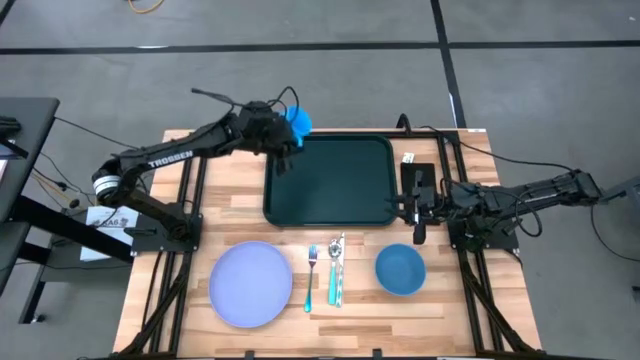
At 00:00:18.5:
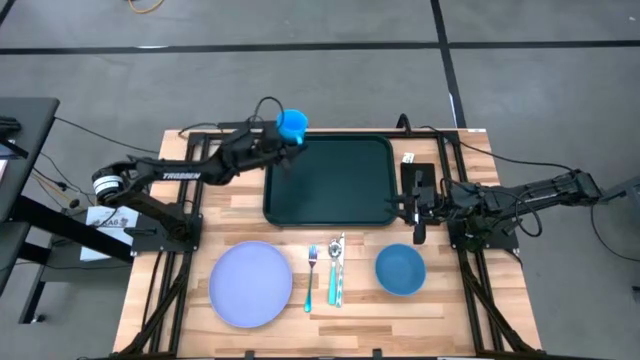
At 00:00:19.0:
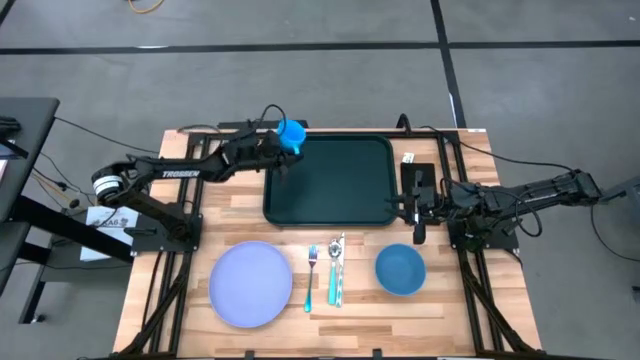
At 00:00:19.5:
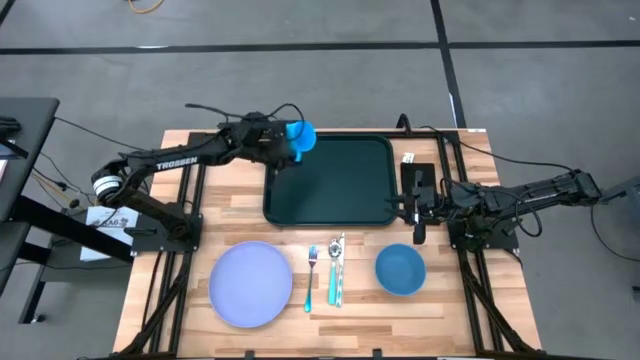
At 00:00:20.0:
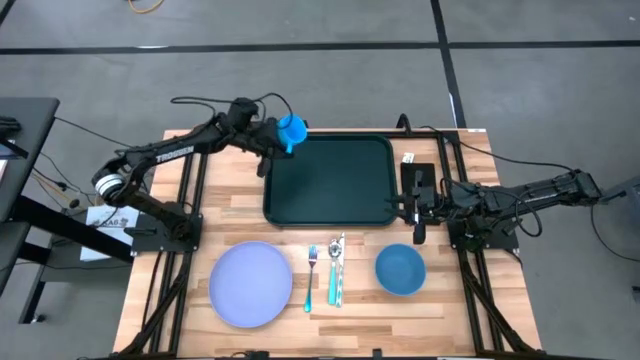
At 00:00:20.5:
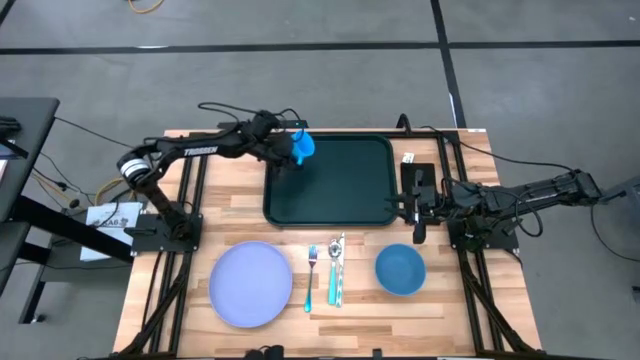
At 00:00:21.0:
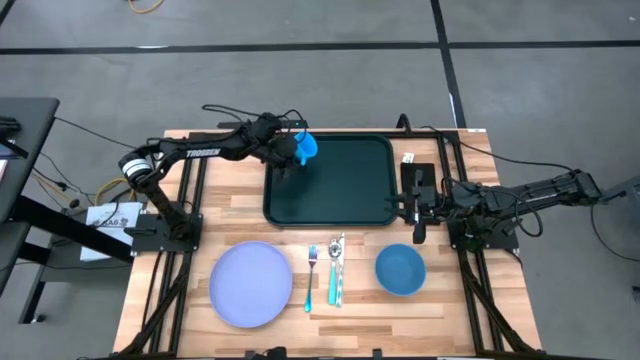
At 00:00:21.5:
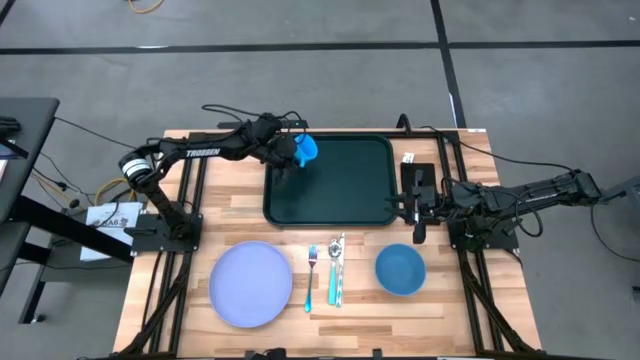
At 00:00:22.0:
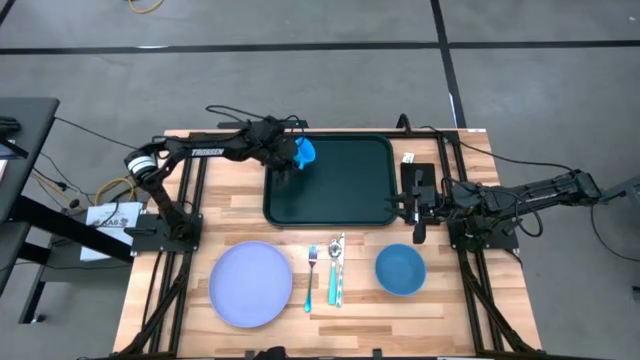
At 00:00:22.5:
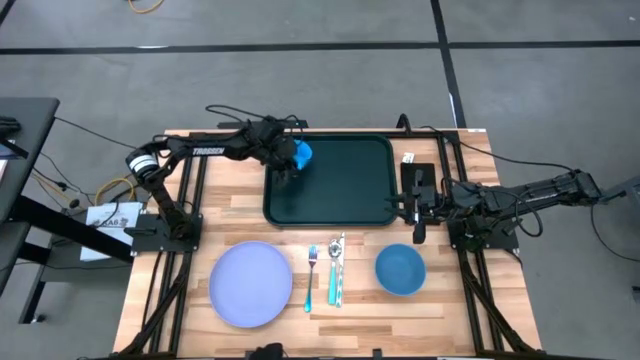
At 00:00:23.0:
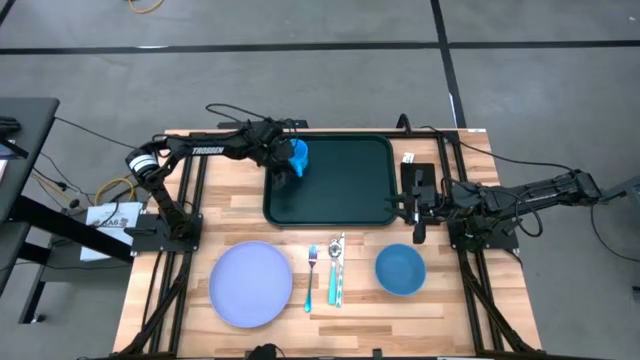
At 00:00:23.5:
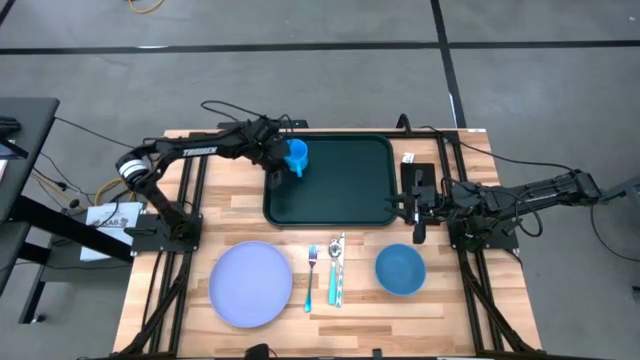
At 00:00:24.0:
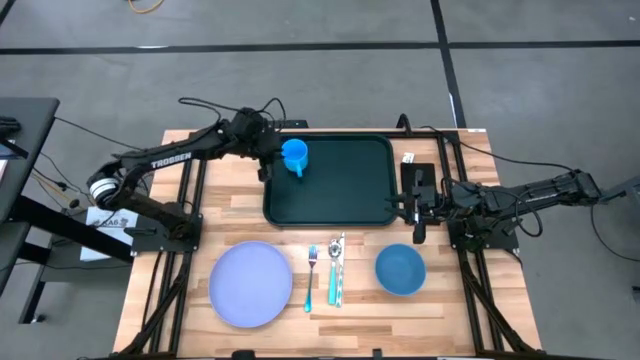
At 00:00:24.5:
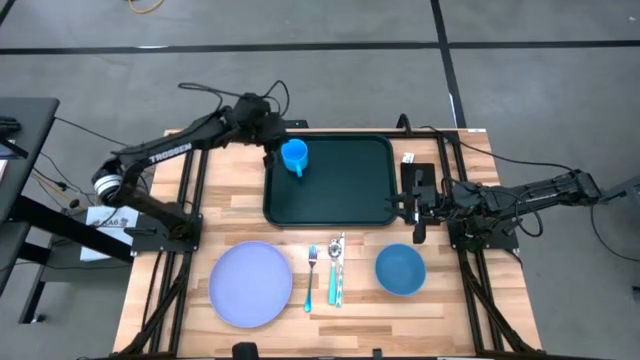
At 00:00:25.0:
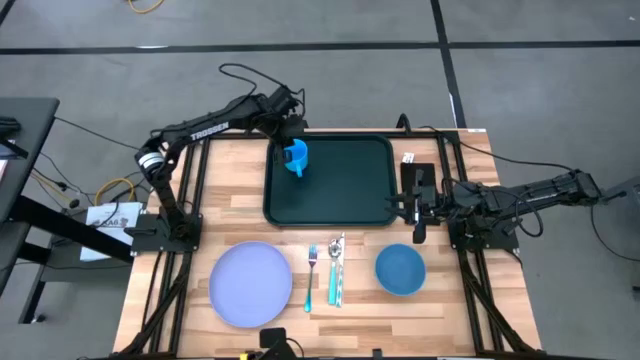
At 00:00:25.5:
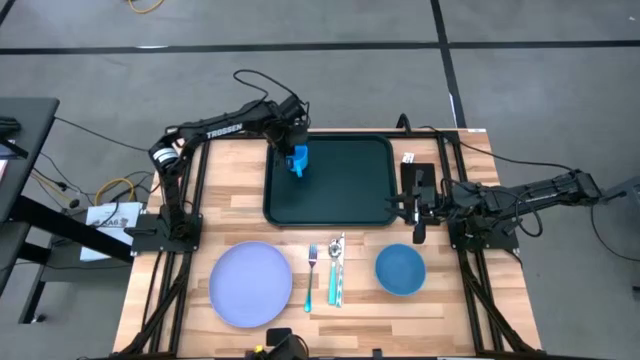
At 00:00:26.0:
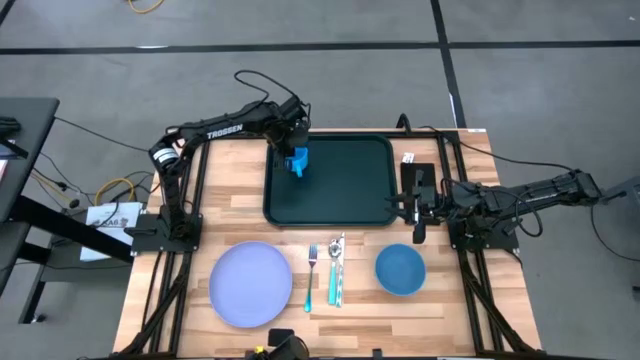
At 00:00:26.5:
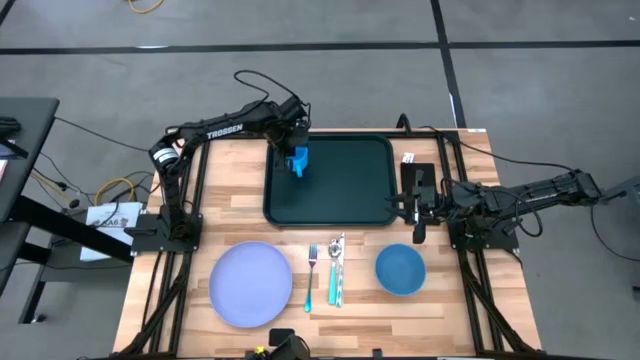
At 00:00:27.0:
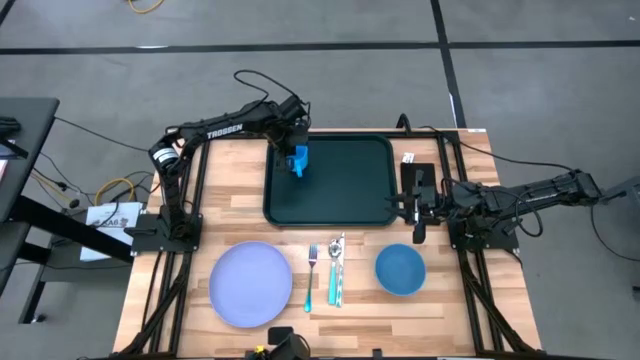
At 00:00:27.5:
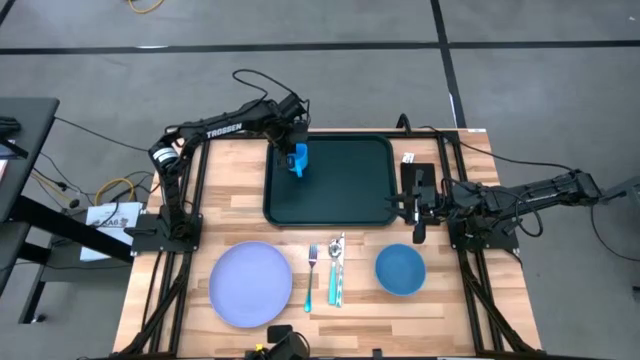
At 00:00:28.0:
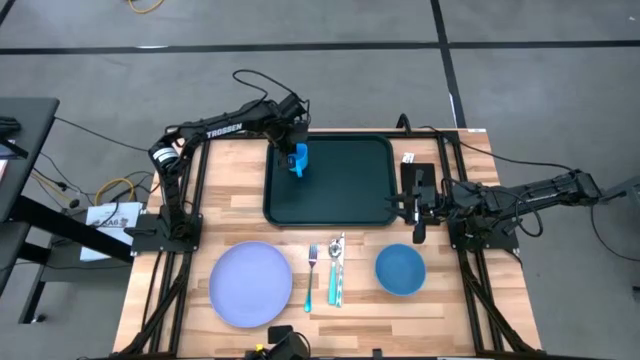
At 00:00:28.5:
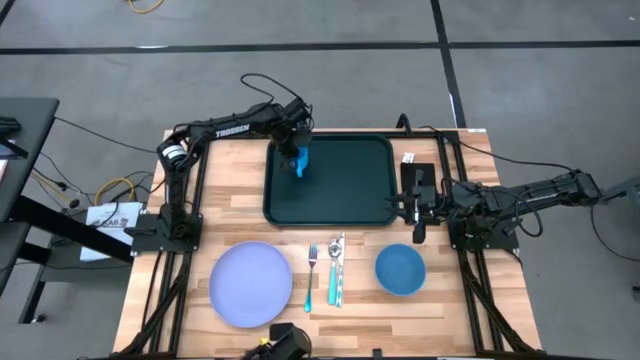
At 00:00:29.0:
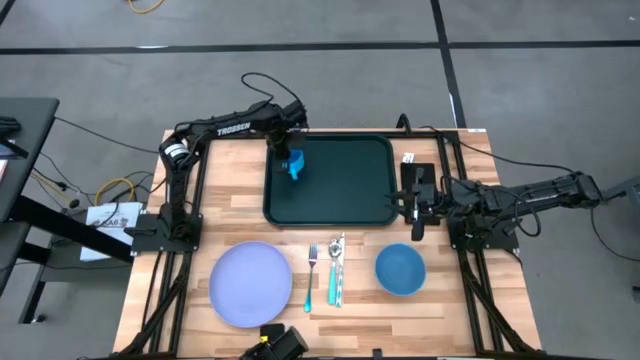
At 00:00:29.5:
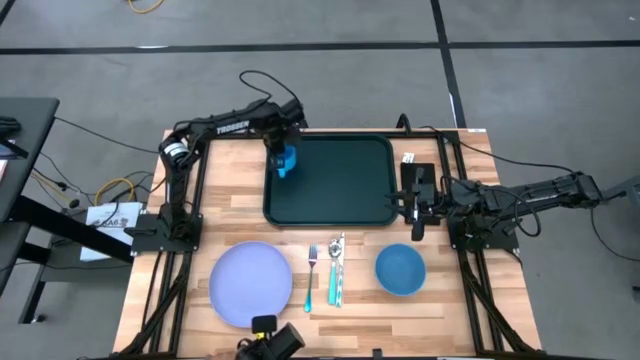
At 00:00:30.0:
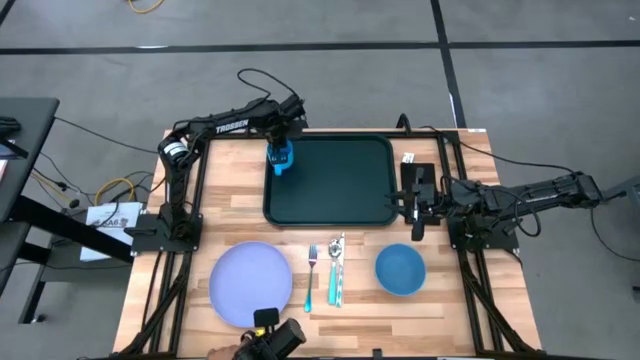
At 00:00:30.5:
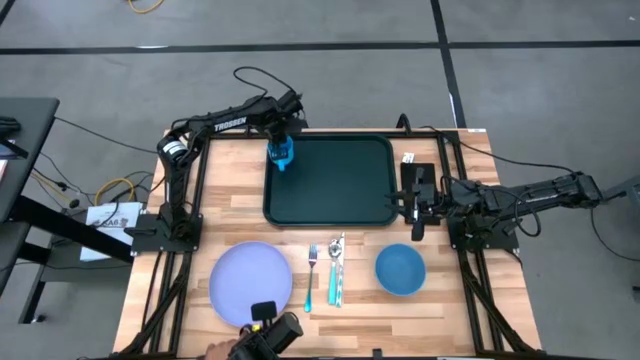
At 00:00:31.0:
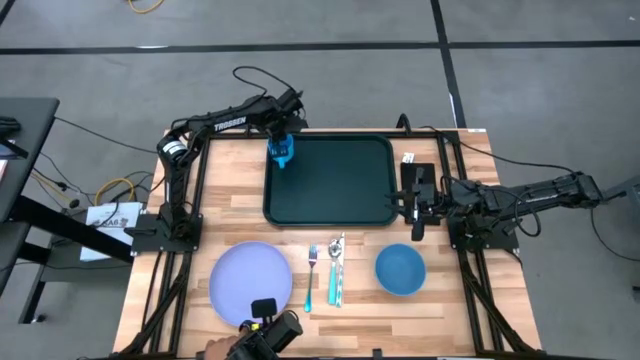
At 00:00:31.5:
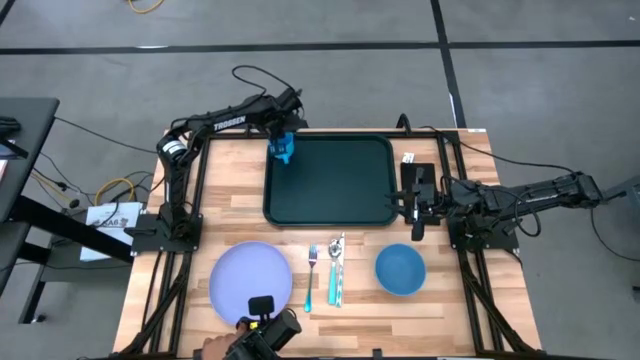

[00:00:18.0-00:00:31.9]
Task: Set up tray
Put the blue mug on the black serving tray

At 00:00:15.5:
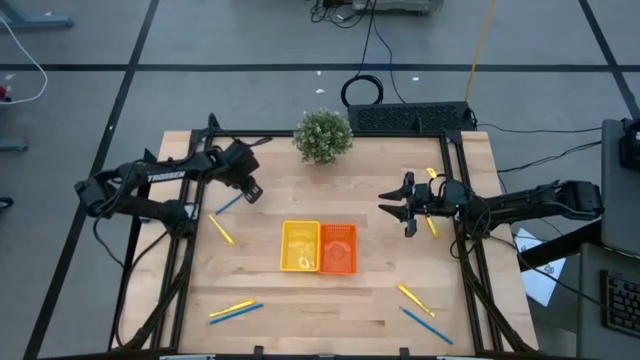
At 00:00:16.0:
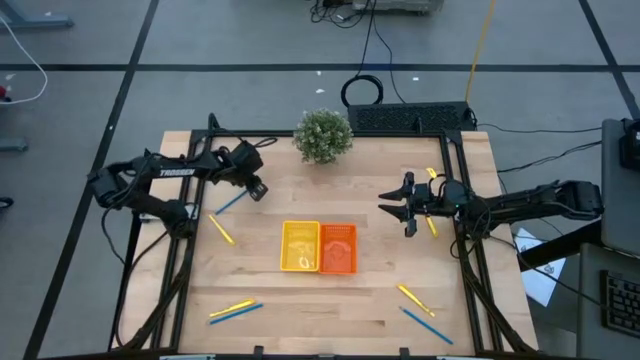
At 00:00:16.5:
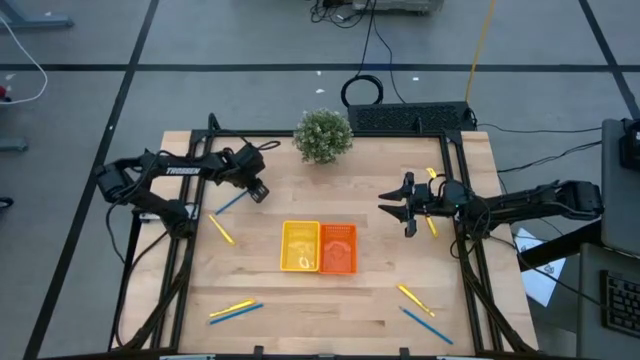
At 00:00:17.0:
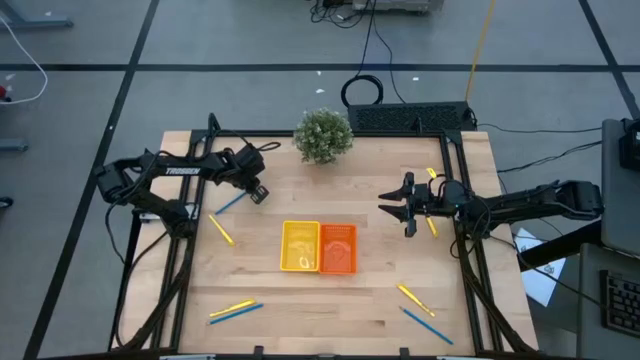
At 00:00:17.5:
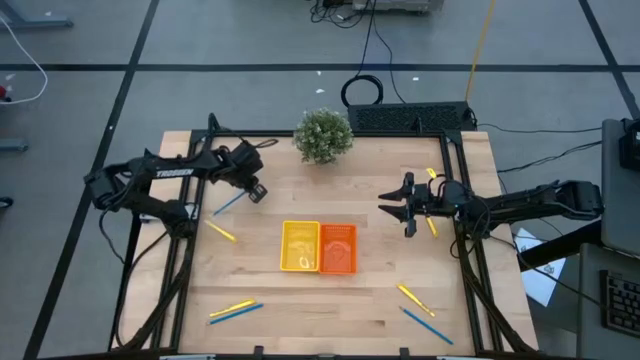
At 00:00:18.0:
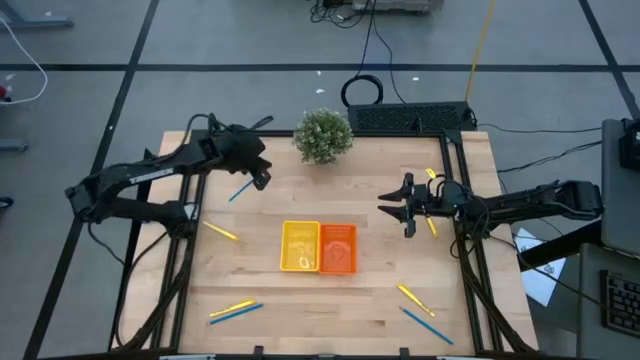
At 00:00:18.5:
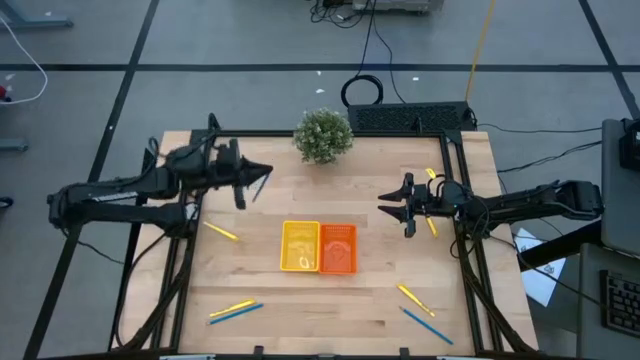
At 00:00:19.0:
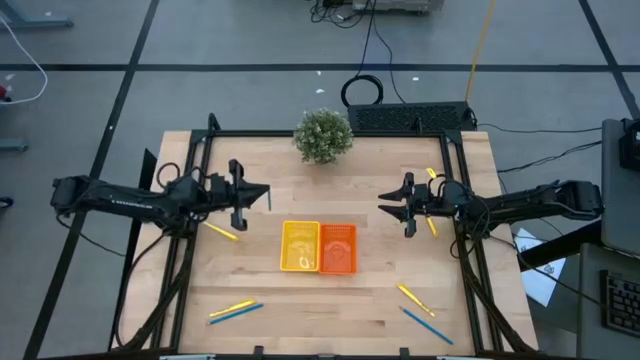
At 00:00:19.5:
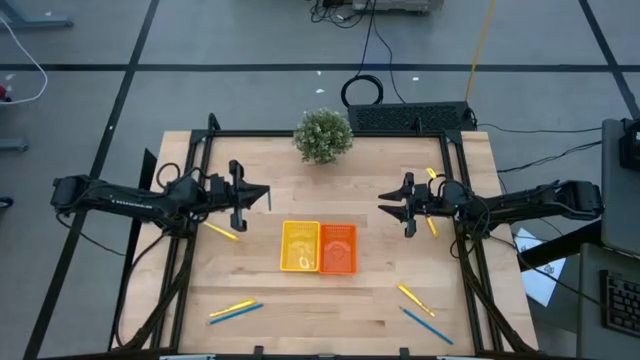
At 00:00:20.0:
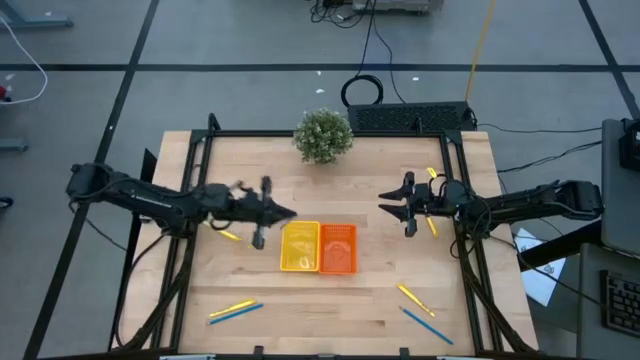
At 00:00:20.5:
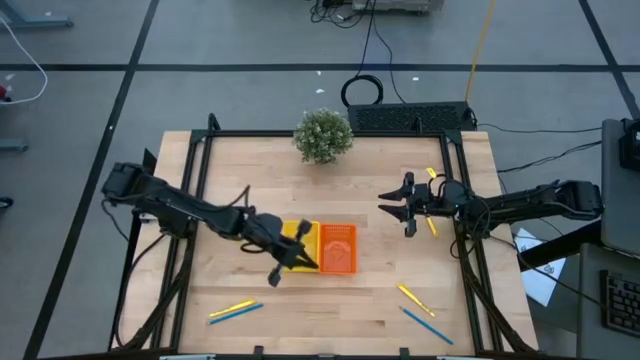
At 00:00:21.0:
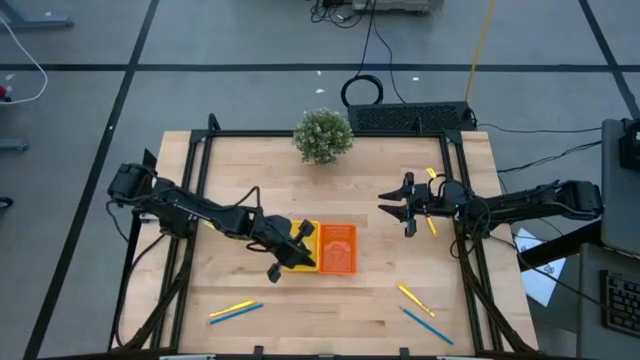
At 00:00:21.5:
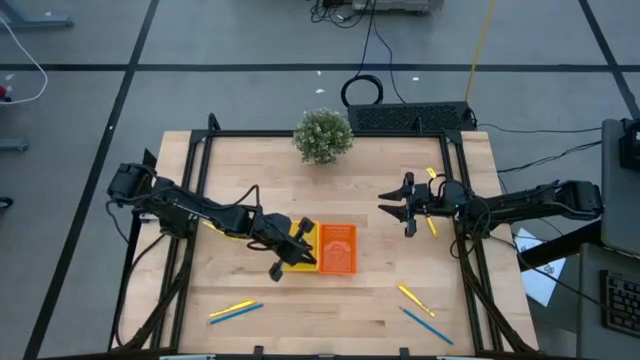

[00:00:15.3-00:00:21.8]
Task: Sort pens & pencils
Put the top left blue pencil into the yellow bin
